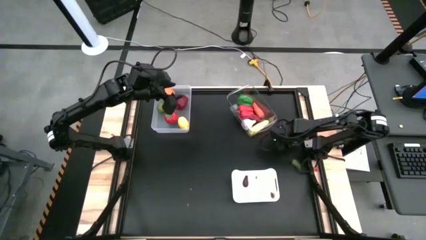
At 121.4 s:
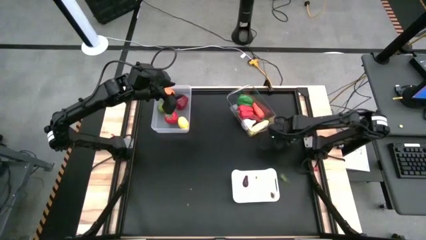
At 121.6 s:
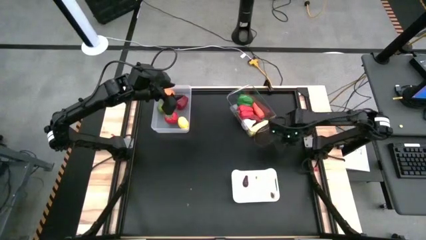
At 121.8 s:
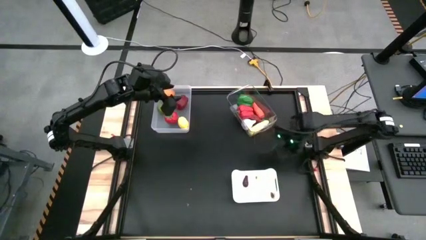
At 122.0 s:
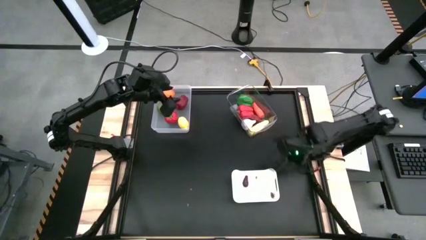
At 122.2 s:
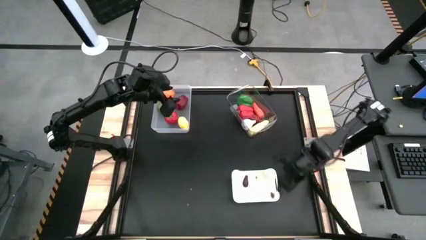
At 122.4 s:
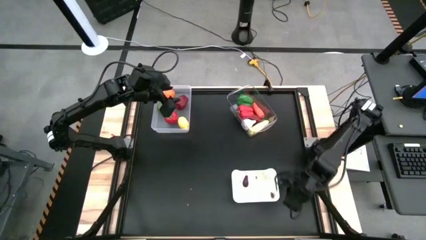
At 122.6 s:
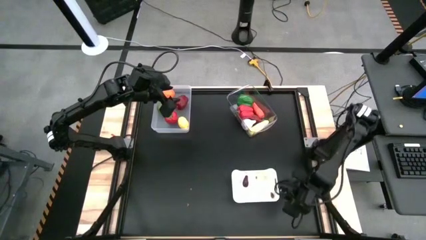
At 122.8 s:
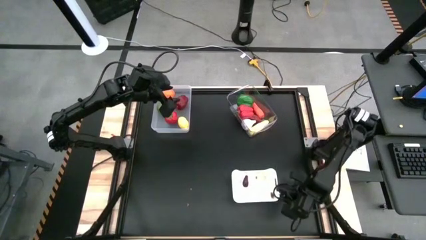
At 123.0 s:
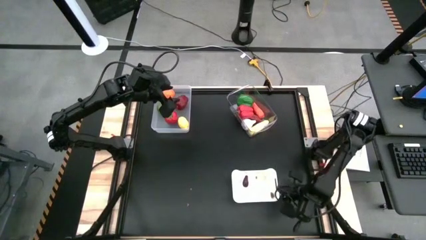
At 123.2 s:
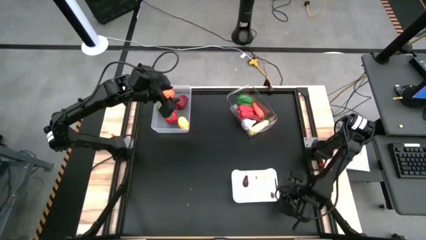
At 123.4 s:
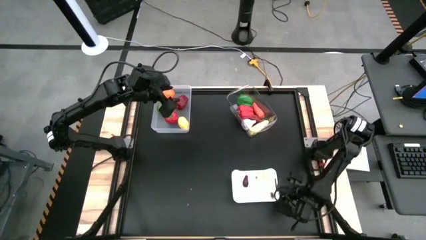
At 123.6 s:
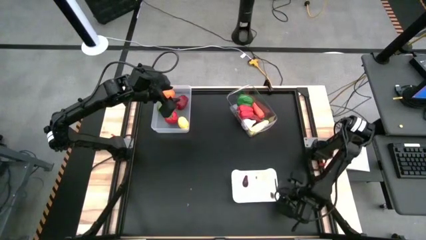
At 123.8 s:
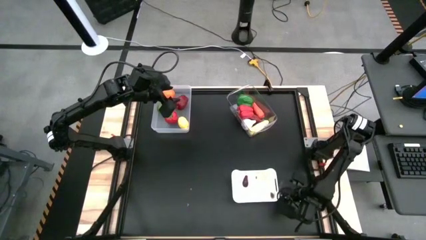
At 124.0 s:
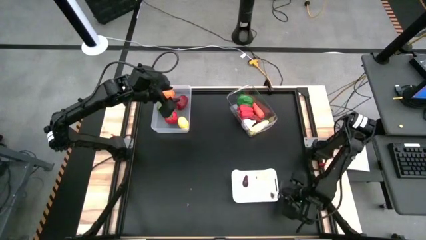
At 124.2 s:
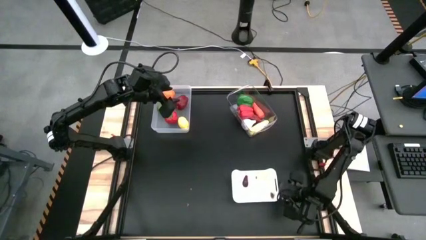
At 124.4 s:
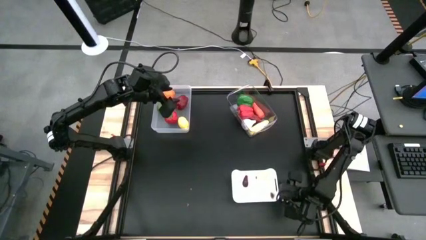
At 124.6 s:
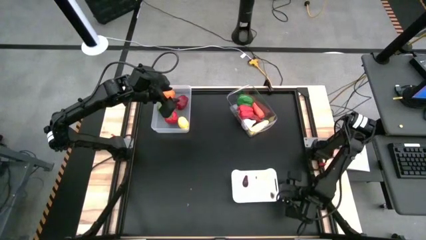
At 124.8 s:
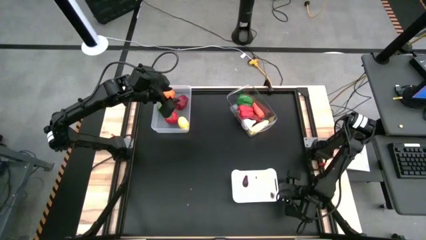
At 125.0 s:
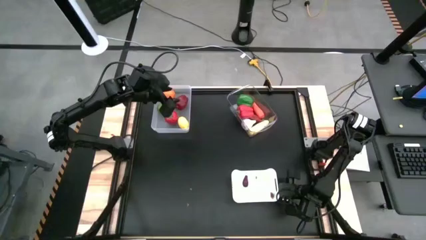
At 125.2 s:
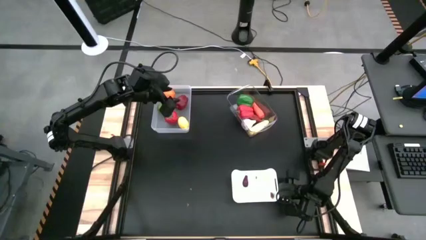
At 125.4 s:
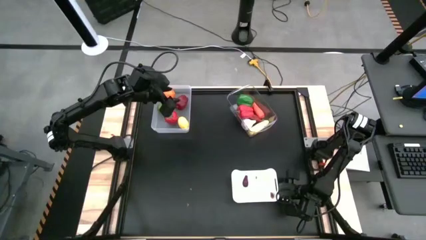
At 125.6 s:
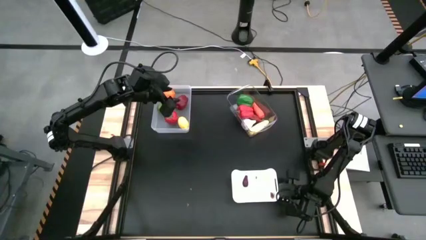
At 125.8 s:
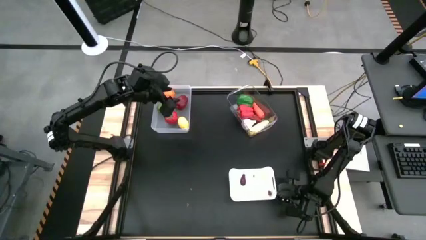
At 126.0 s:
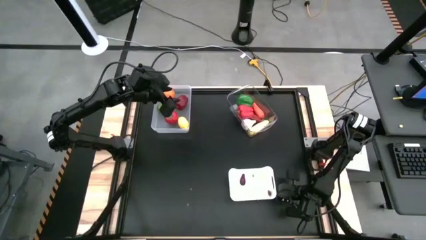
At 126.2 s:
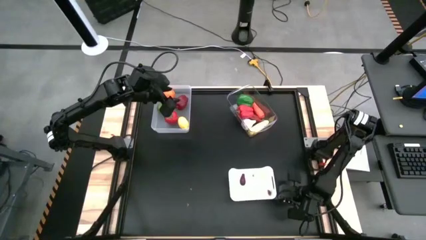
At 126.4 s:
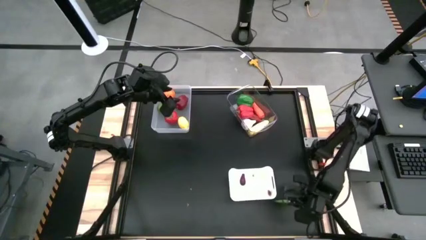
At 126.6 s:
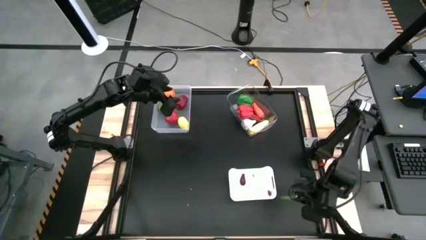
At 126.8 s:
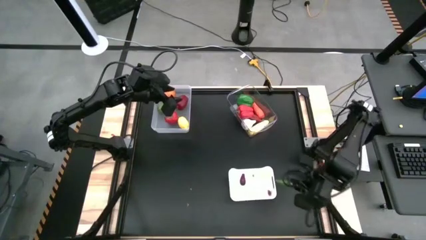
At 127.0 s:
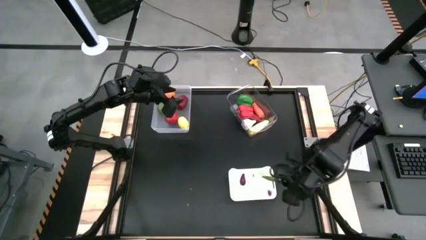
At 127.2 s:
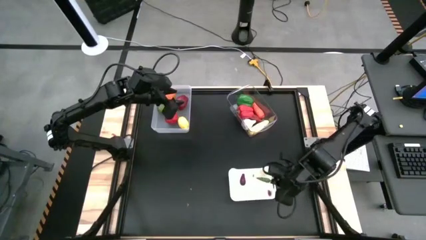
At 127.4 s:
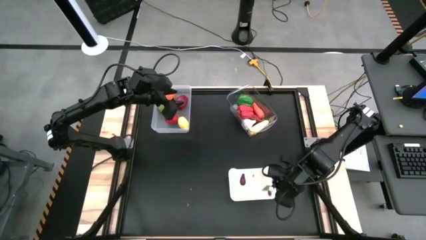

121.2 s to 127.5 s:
Task: Sort produce into baskets
Put the green chili pepper into the white bin

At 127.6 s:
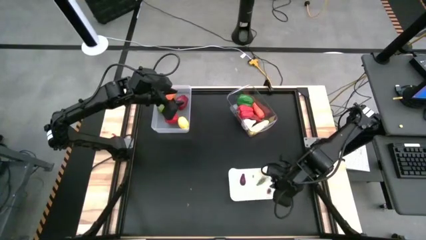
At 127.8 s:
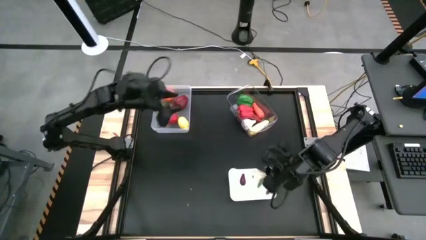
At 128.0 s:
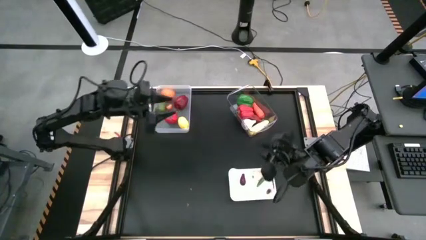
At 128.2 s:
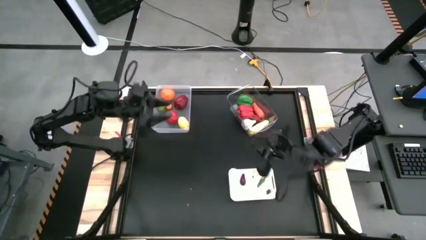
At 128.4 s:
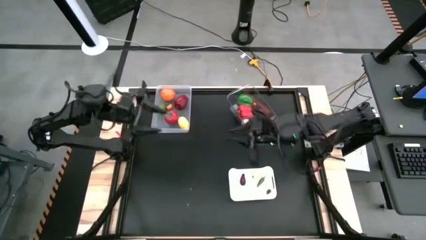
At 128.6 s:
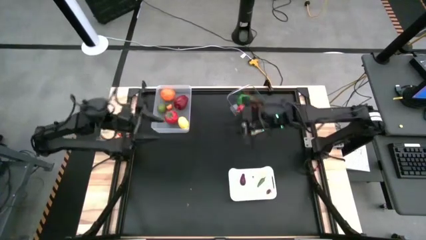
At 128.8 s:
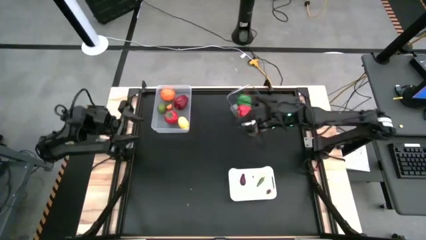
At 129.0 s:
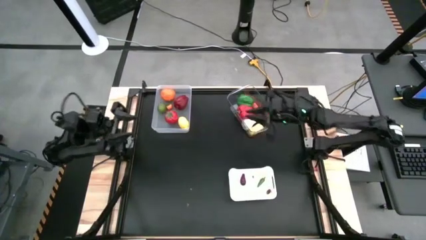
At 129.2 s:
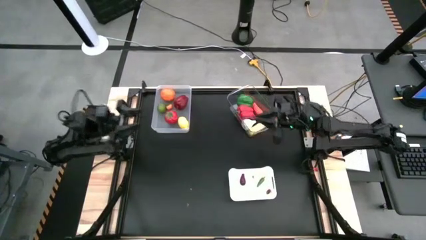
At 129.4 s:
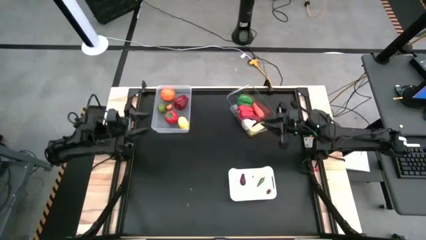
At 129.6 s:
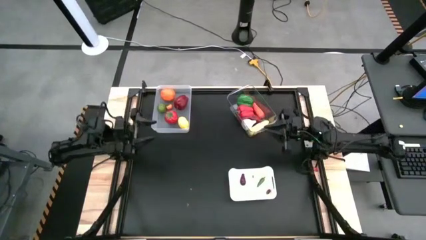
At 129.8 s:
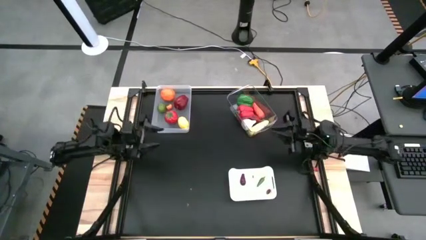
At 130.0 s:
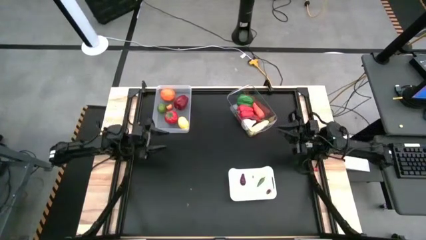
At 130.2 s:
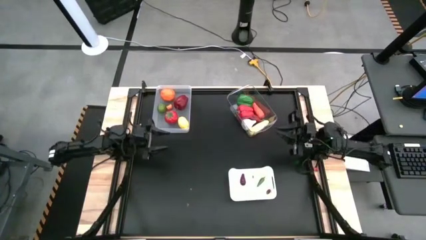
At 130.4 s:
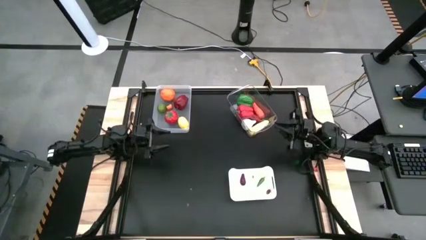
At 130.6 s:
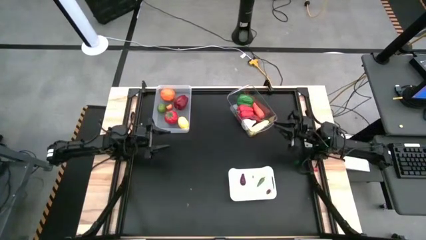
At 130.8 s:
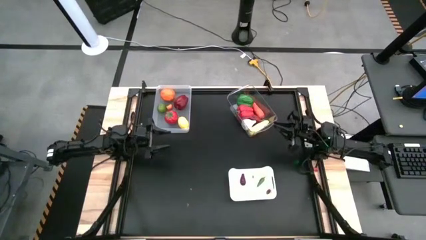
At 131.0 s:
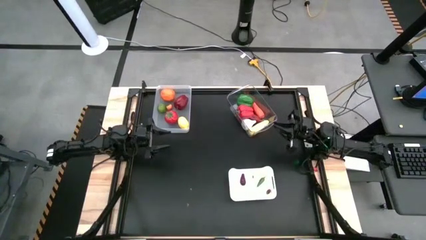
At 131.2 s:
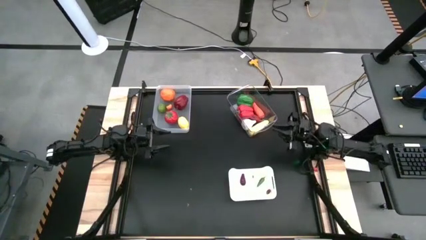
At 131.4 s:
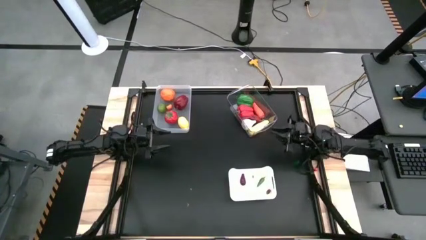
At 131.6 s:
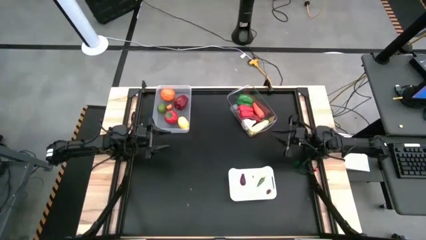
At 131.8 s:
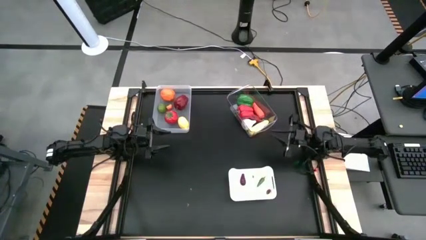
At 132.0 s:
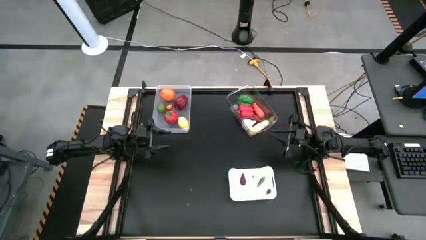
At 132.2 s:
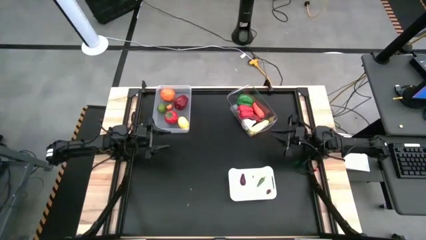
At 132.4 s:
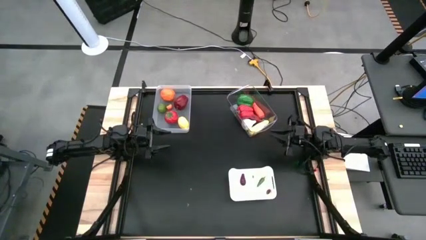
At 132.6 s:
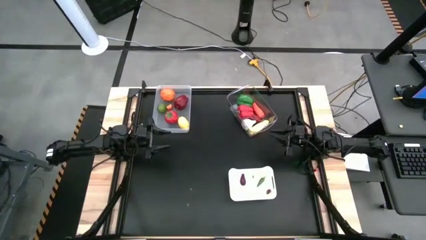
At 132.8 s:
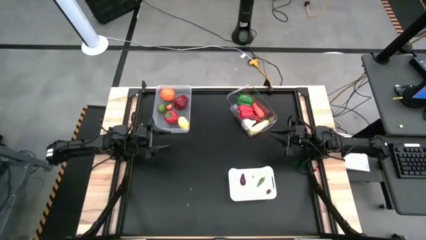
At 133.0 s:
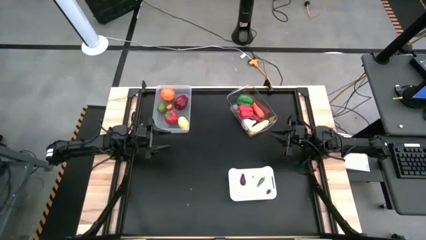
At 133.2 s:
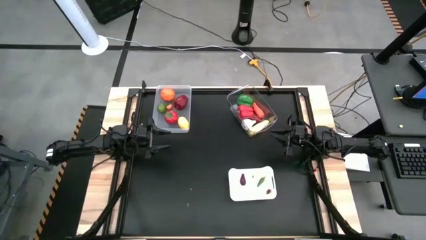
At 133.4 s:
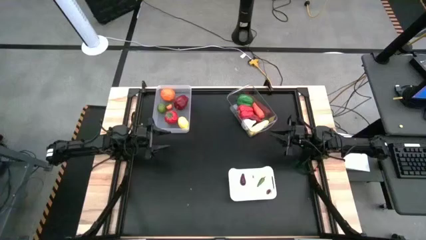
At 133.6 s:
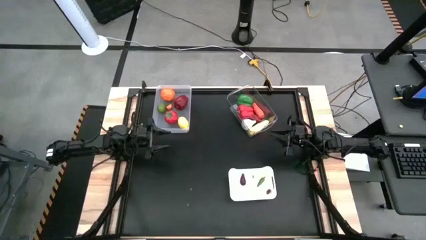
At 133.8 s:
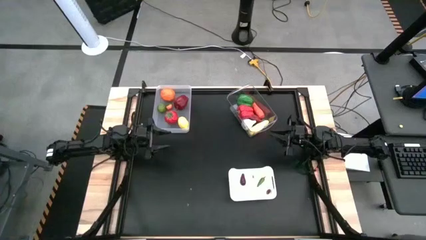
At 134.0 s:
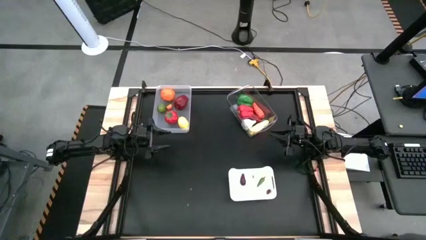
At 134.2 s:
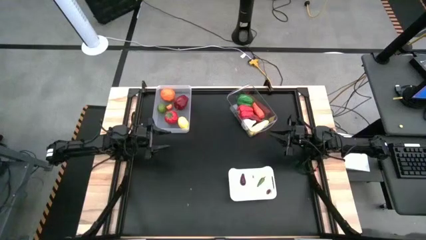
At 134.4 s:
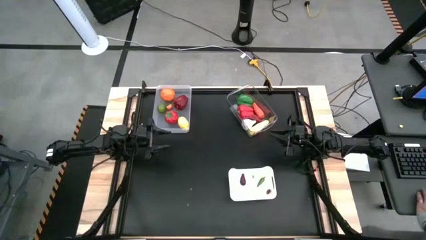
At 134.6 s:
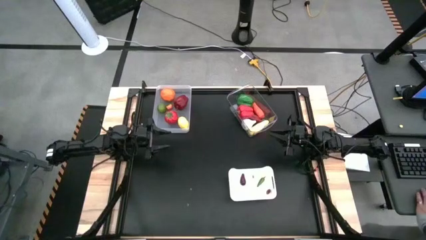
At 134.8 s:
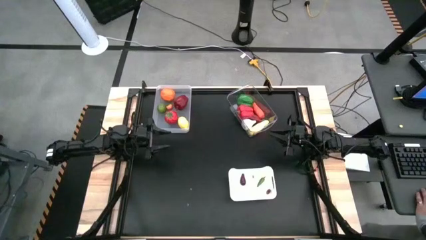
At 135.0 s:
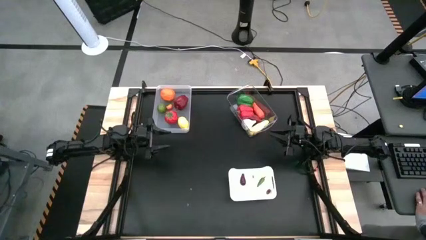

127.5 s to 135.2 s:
Return to Home Position

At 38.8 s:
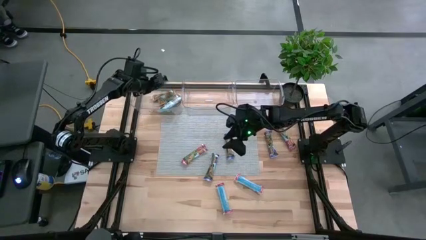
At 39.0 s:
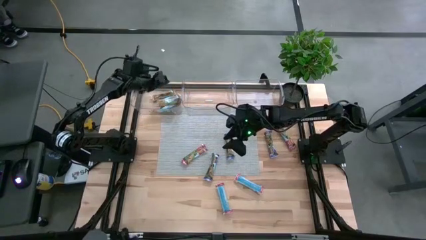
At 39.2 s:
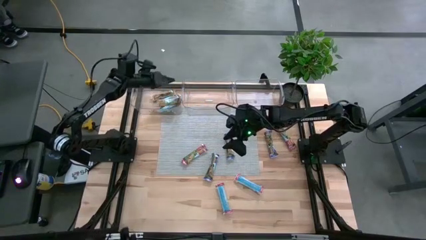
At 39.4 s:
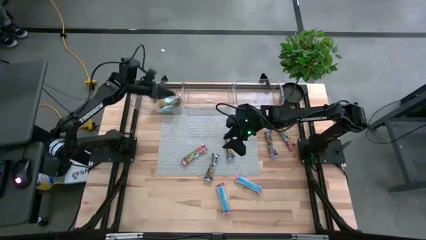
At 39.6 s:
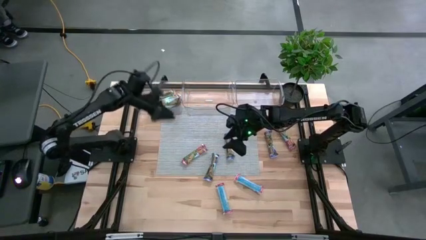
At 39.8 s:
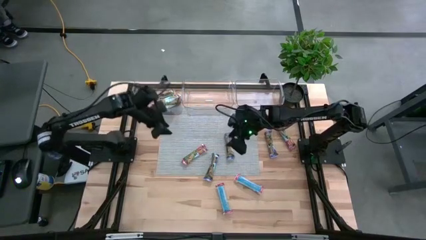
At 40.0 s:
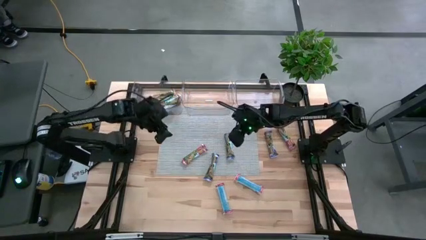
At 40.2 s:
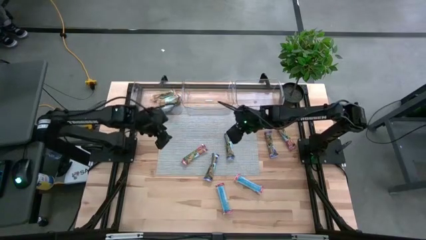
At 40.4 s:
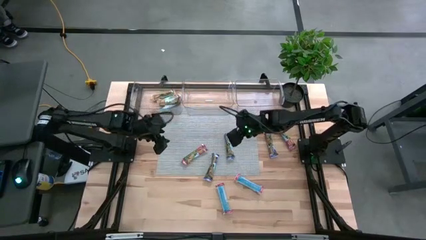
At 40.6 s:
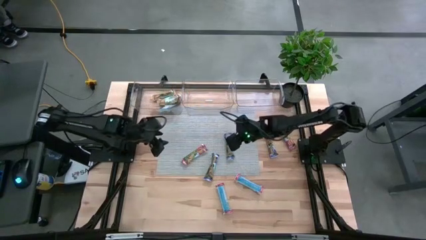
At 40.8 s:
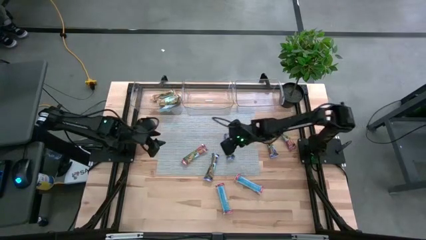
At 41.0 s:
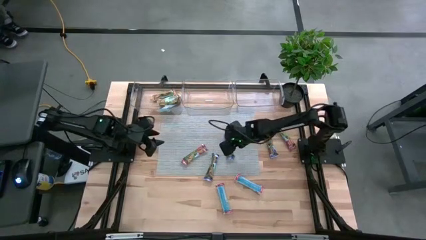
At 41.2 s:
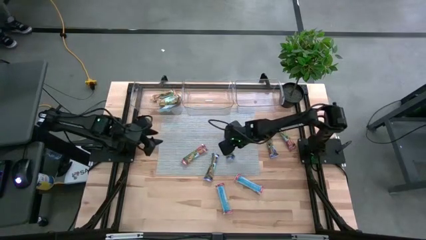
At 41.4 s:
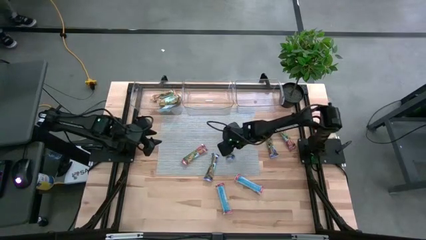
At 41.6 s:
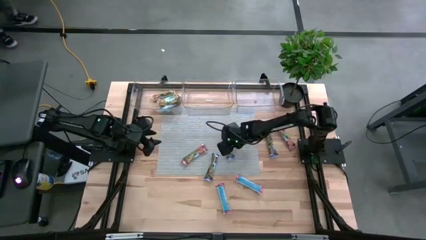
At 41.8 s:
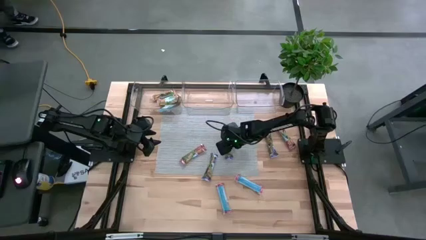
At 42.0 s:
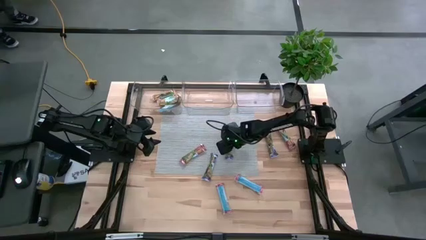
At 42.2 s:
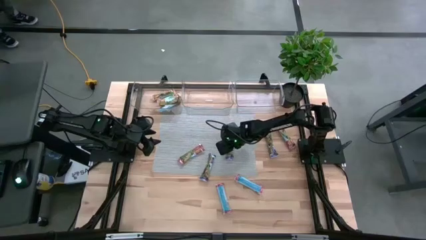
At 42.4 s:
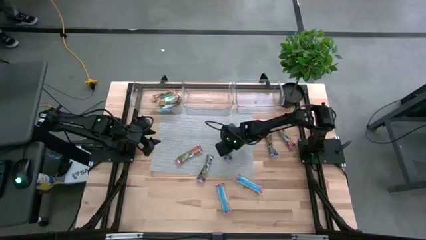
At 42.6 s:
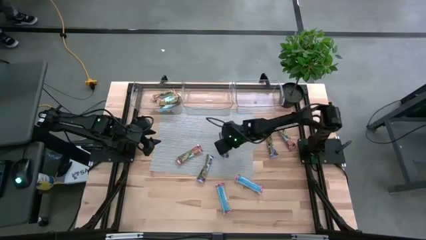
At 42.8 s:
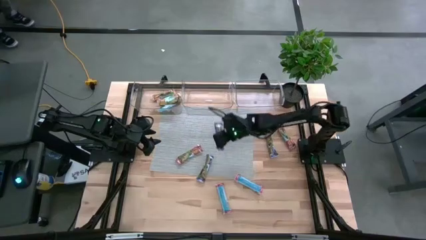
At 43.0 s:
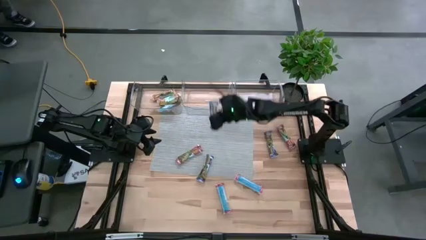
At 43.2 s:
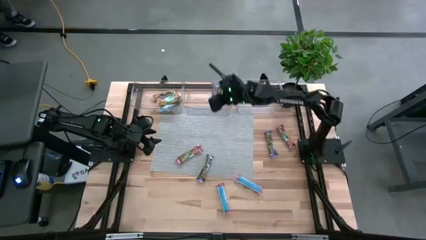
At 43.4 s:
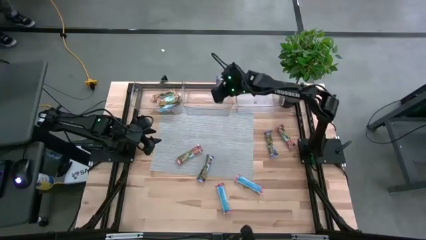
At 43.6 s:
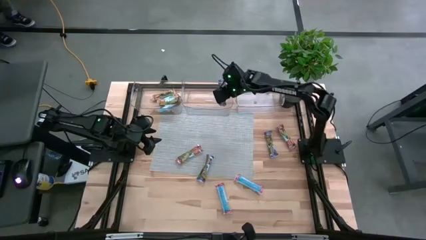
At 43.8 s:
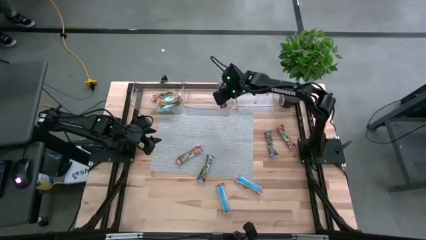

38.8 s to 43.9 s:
Task: Pick and place Granola Bars by type
Put the blue granola bar into the middle transparent bin
